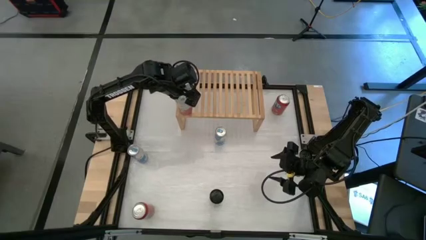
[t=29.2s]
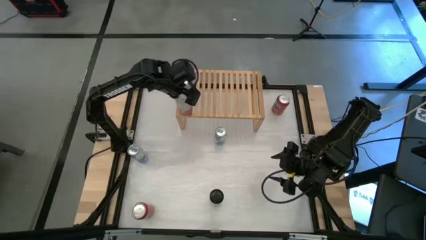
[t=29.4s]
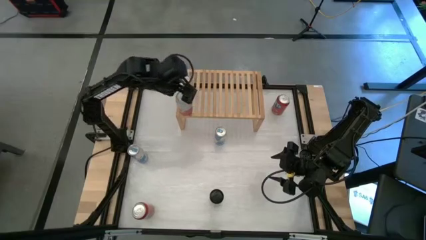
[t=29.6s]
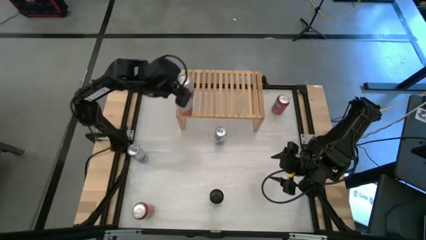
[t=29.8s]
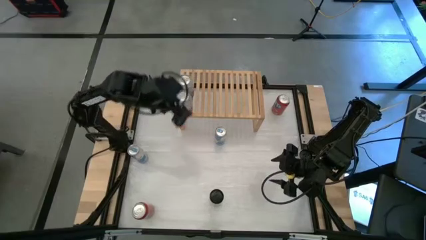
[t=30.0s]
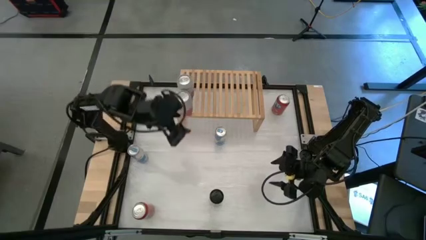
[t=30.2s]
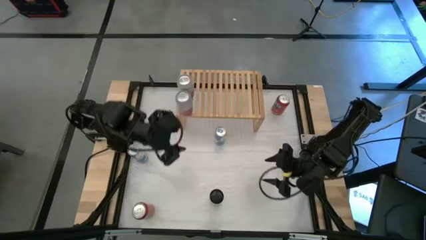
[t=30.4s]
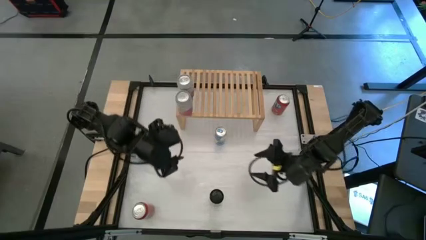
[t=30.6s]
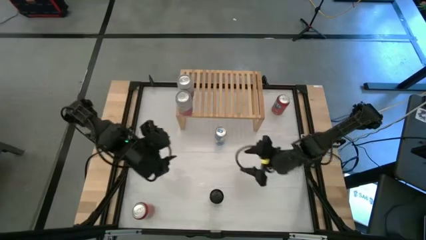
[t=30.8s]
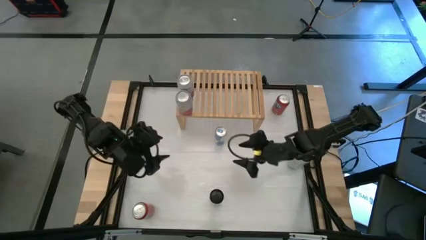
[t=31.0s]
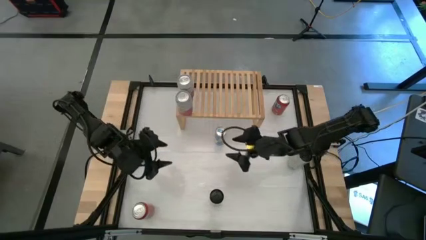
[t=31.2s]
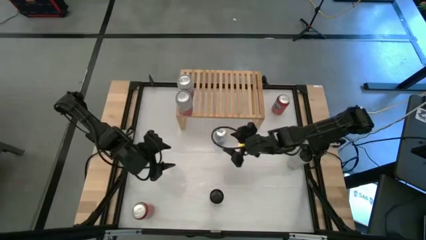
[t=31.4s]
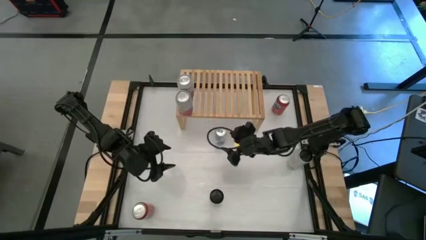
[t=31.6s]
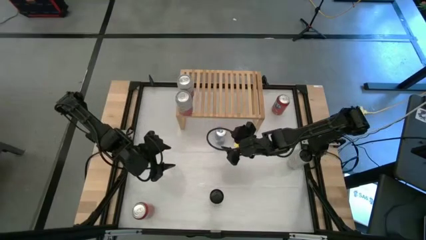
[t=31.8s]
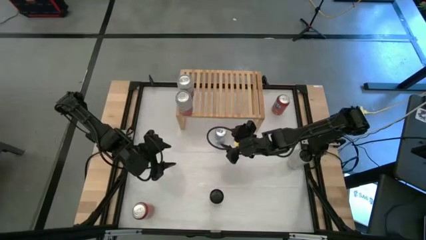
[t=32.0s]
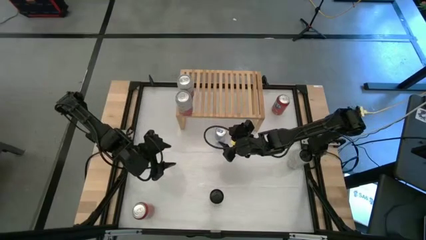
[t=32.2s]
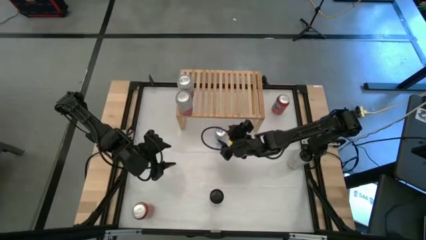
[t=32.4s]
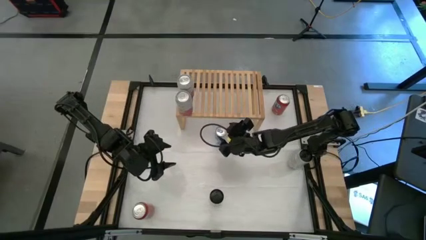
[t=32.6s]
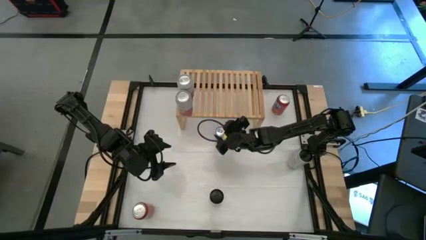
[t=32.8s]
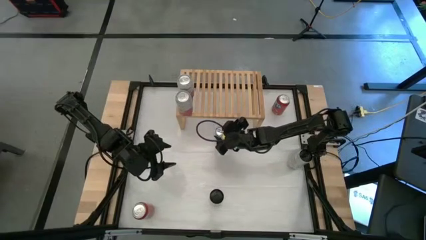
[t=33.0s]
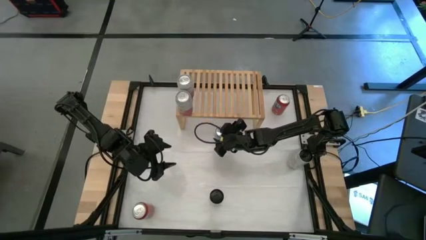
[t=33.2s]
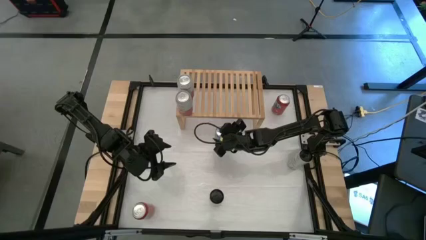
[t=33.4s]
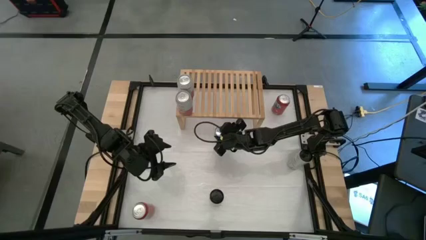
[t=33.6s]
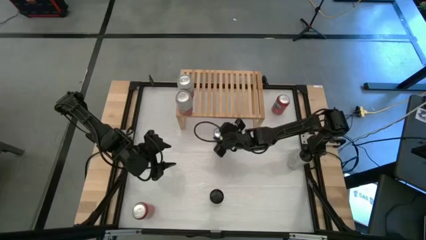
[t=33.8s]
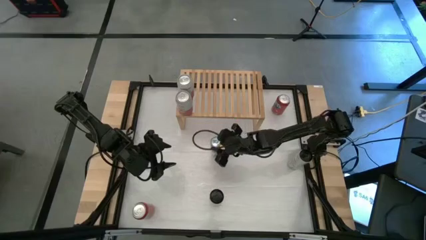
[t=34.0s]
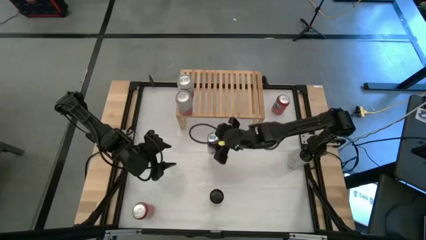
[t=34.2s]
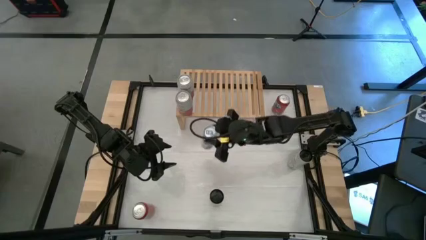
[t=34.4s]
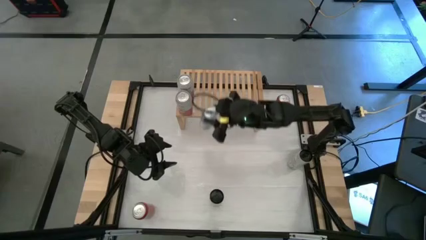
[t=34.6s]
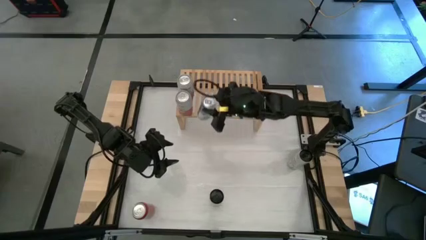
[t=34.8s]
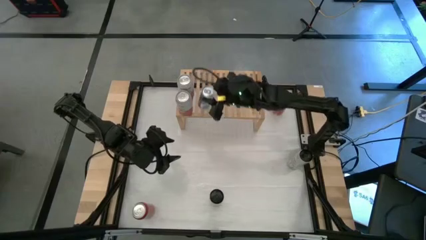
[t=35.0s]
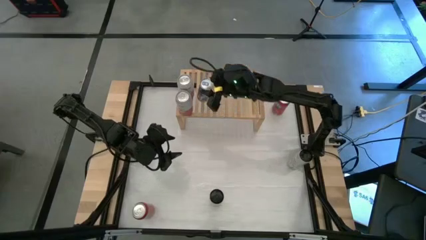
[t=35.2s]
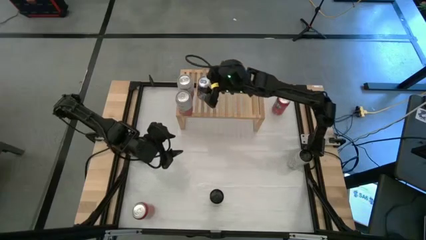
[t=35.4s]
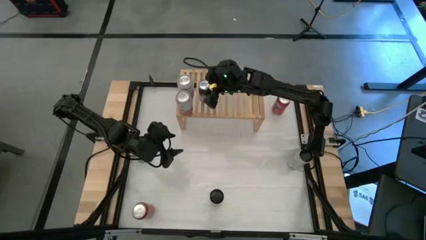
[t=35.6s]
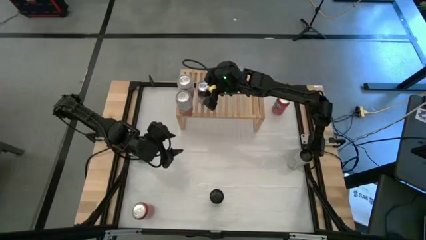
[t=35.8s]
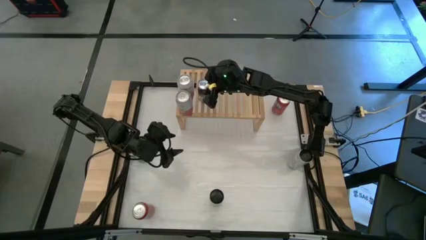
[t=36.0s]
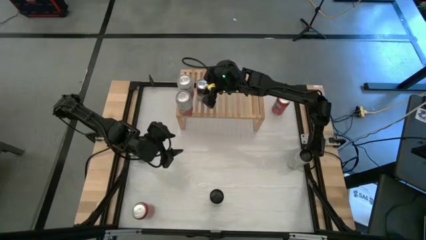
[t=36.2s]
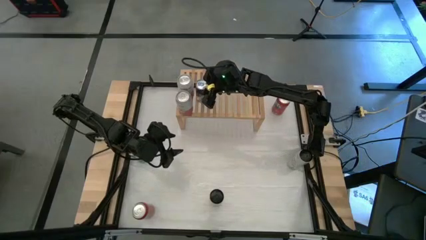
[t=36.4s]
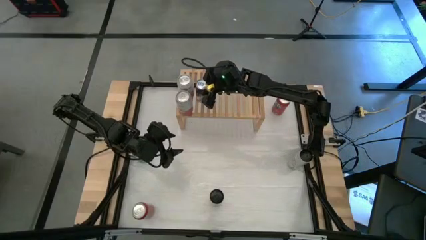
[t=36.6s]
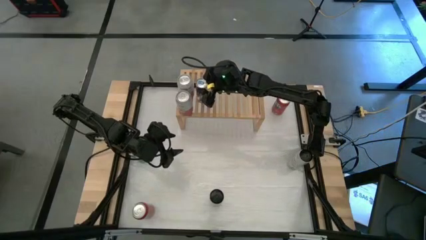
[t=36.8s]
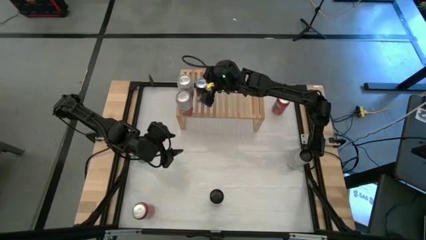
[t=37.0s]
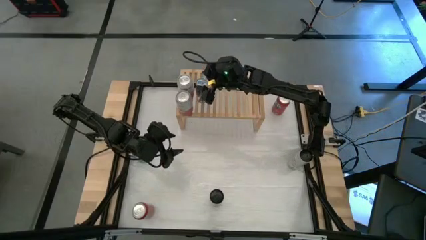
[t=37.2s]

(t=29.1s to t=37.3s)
Task: Place canned beverage on shelf
Put the right blue soda can on the shelf

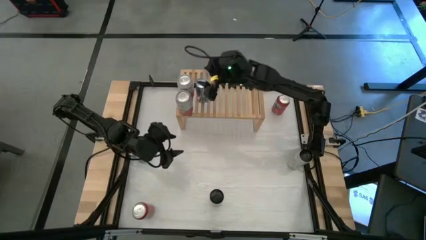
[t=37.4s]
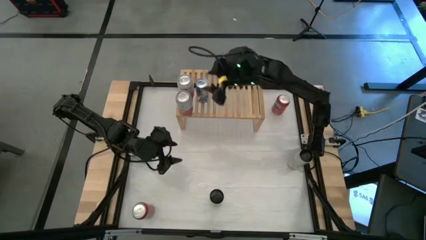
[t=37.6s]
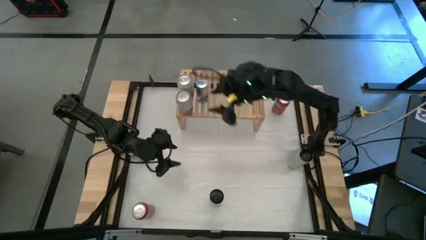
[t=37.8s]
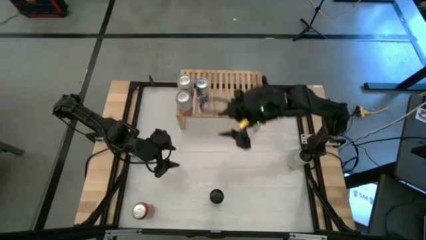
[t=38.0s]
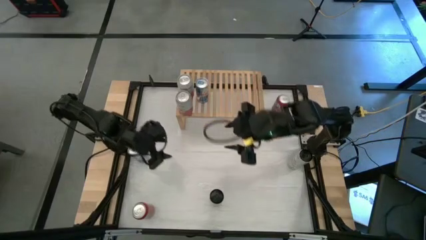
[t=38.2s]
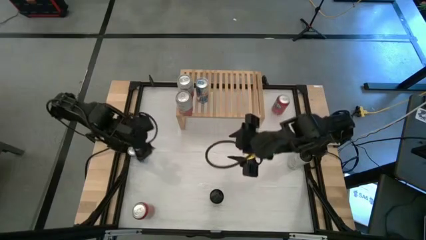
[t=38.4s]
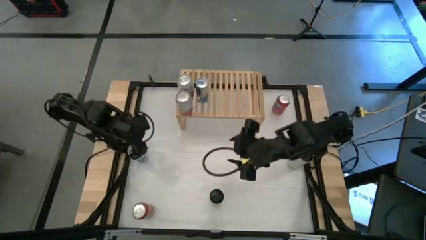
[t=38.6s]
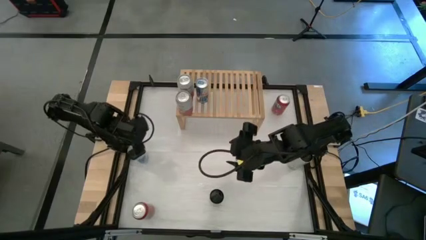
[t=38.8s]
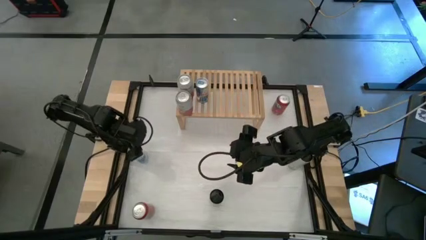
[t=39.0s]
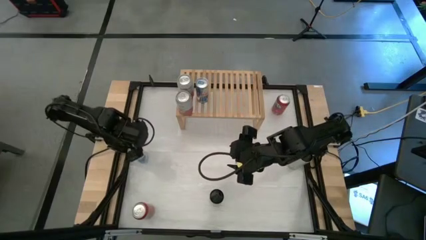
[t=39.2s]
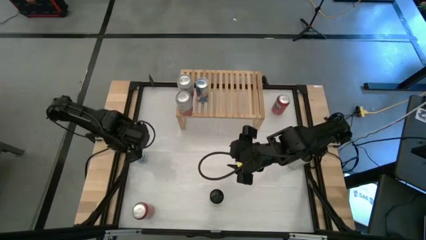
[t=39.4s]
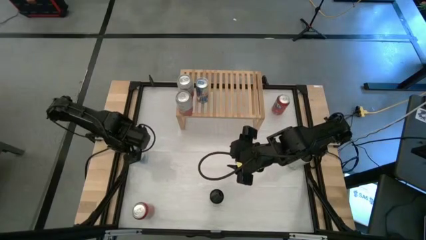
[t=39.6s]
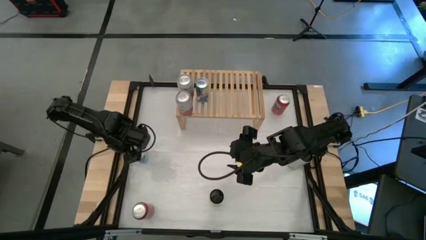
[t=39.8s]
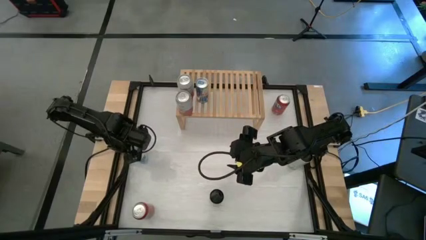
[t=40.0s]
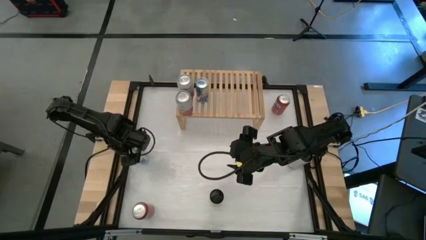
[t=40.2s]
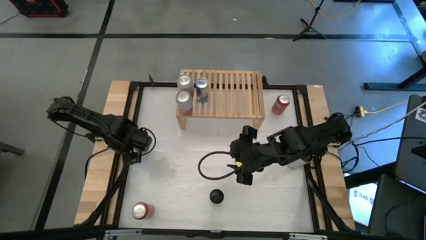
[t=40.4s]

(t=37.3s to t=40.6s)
Put the blue soda can on the shelf aligned with the other blue soda can
